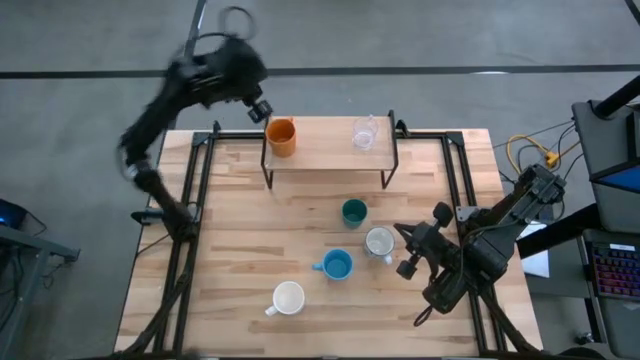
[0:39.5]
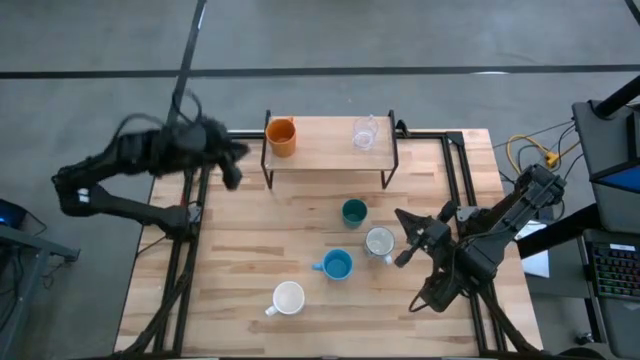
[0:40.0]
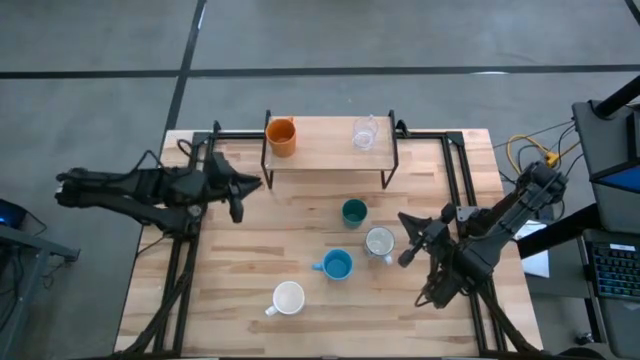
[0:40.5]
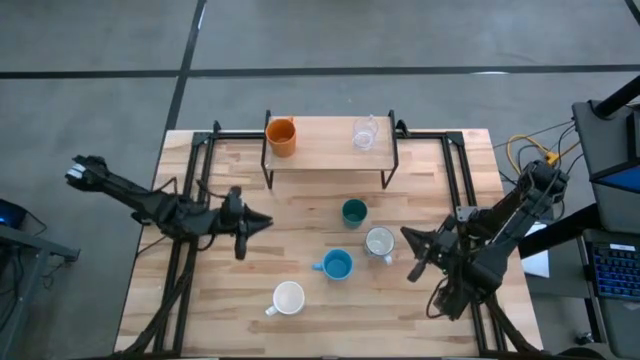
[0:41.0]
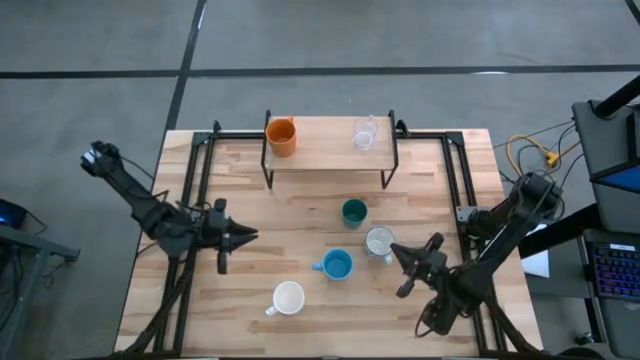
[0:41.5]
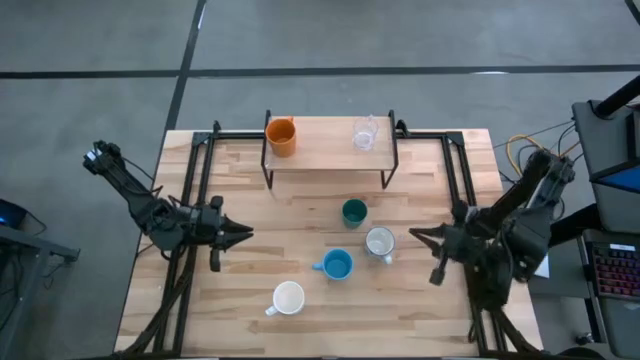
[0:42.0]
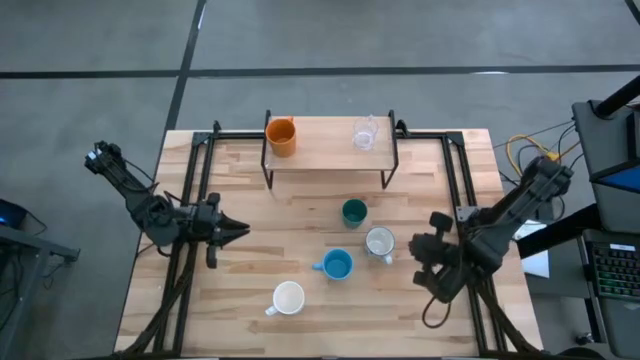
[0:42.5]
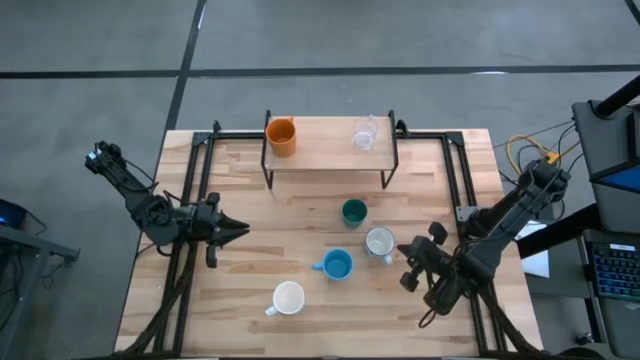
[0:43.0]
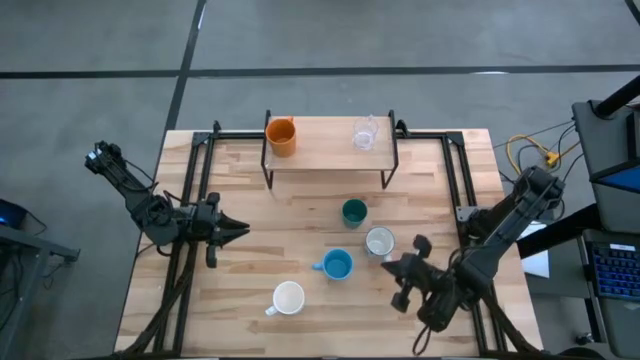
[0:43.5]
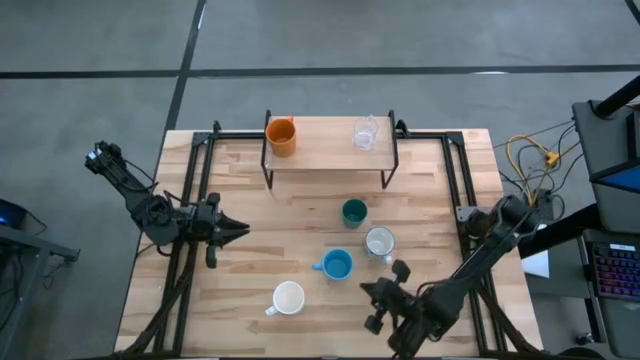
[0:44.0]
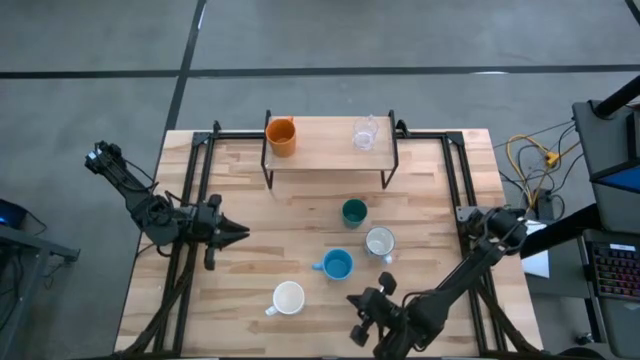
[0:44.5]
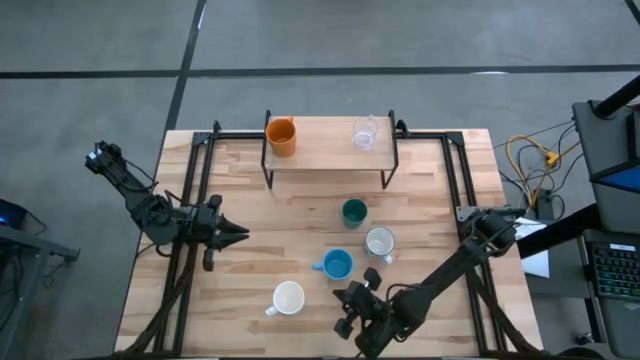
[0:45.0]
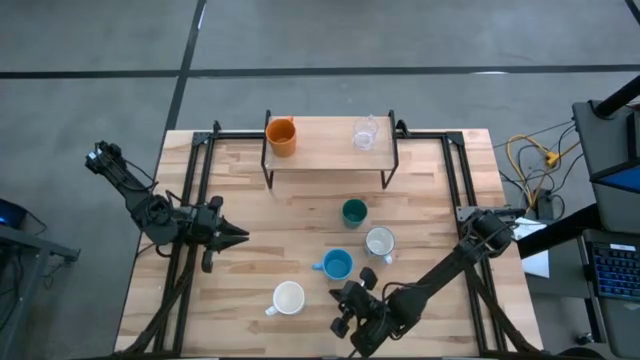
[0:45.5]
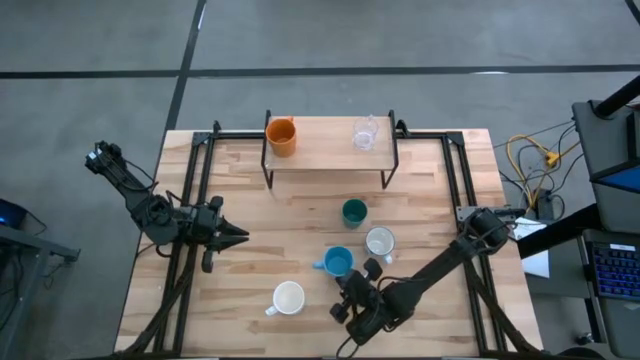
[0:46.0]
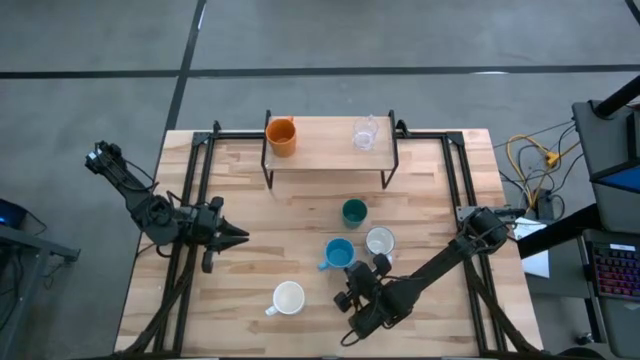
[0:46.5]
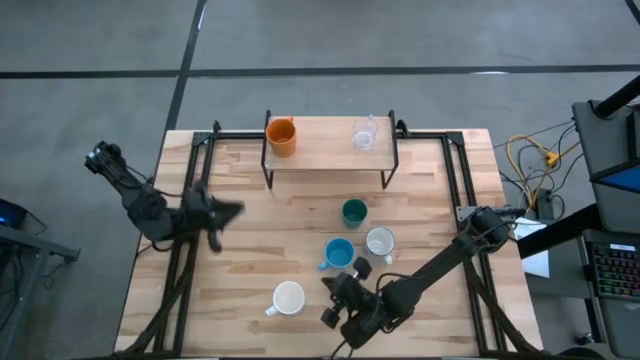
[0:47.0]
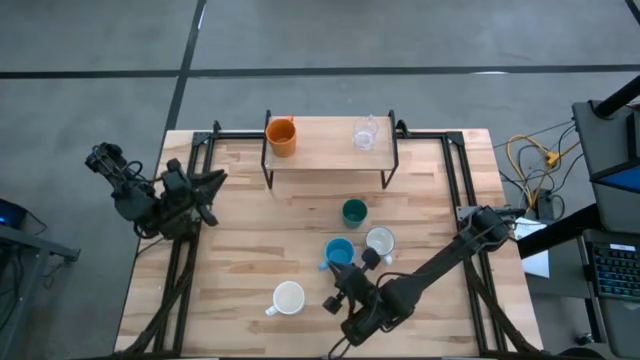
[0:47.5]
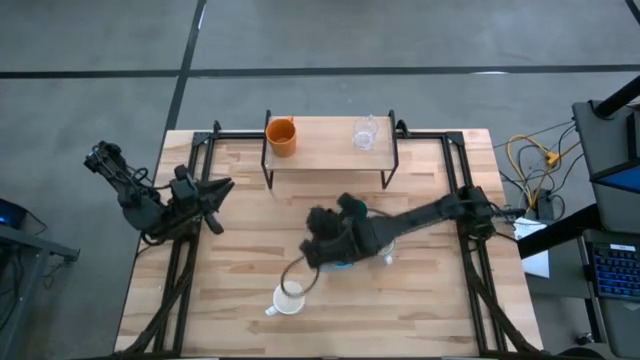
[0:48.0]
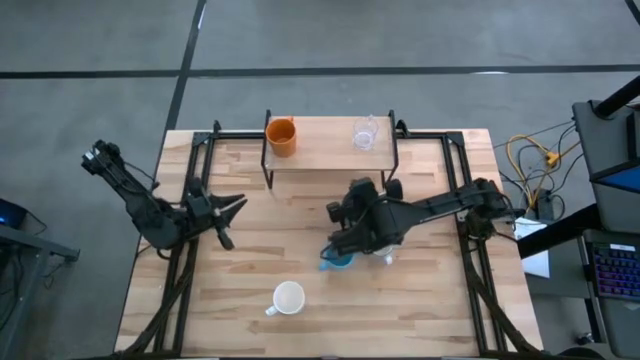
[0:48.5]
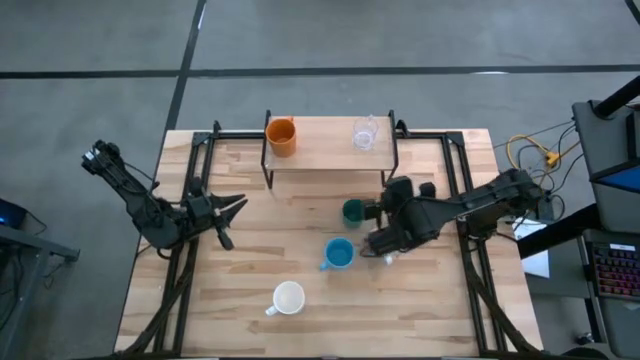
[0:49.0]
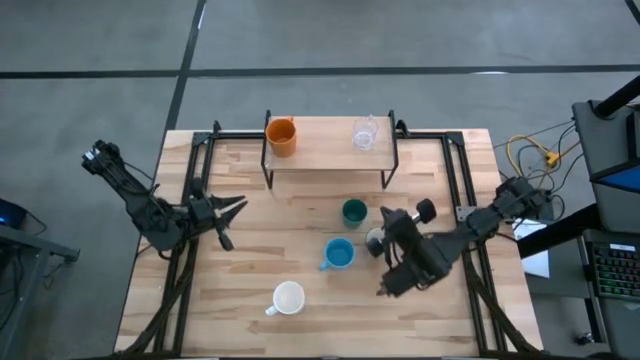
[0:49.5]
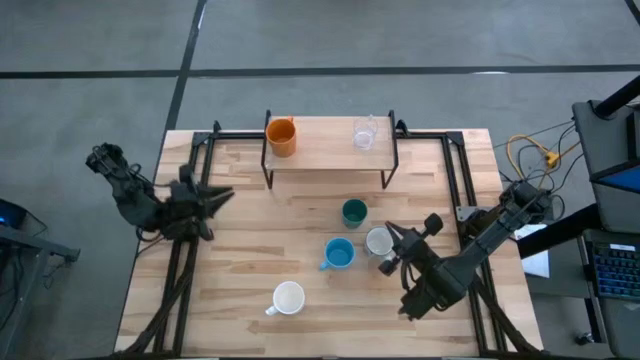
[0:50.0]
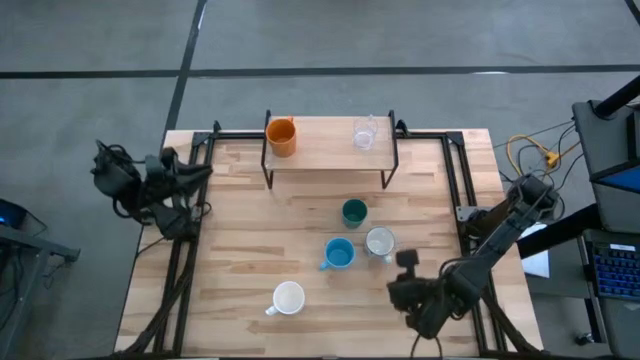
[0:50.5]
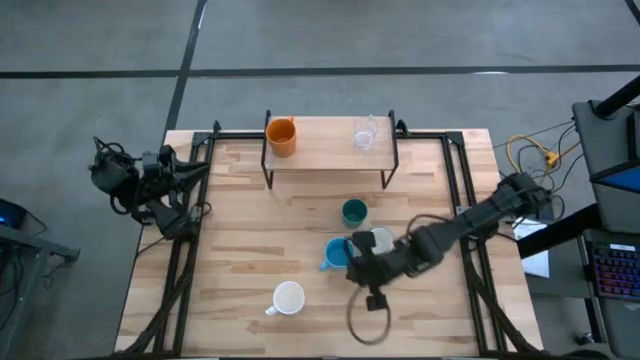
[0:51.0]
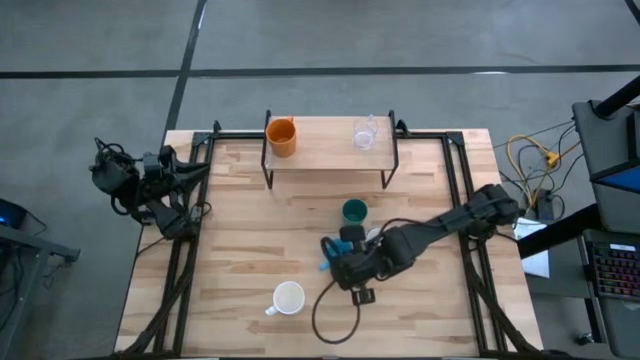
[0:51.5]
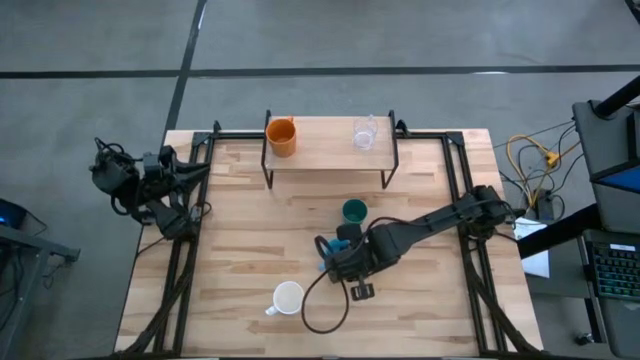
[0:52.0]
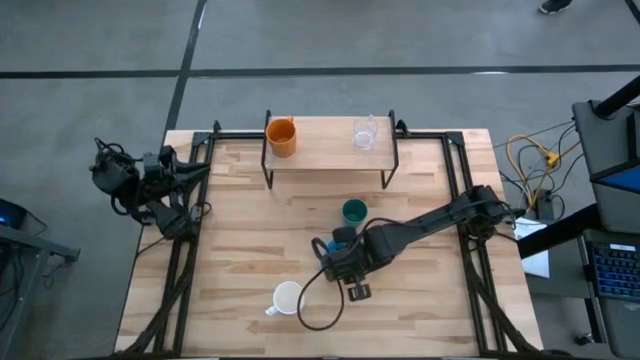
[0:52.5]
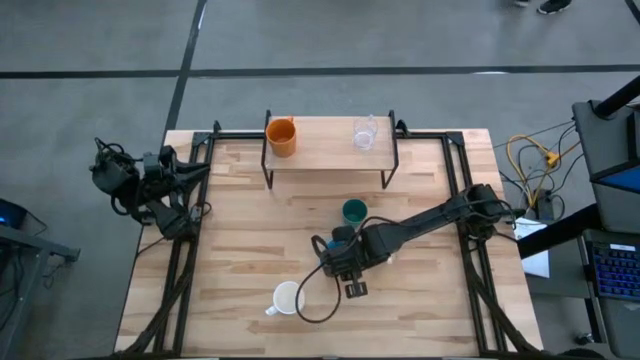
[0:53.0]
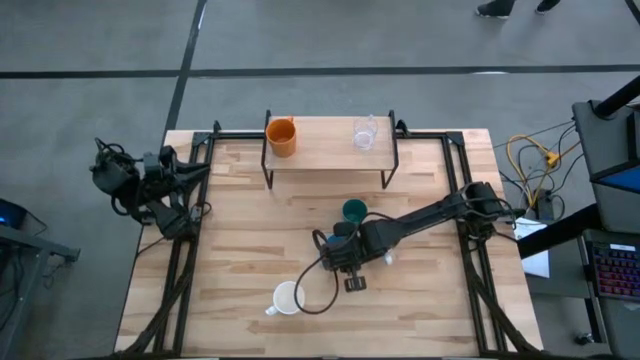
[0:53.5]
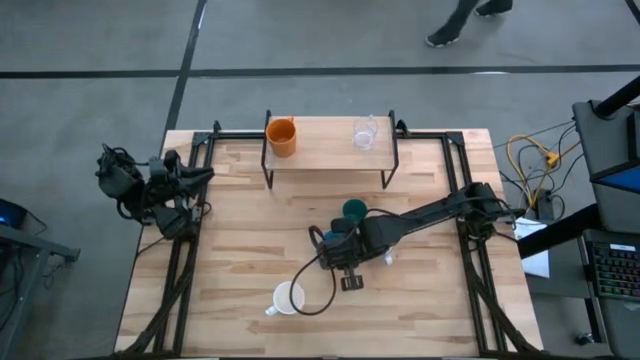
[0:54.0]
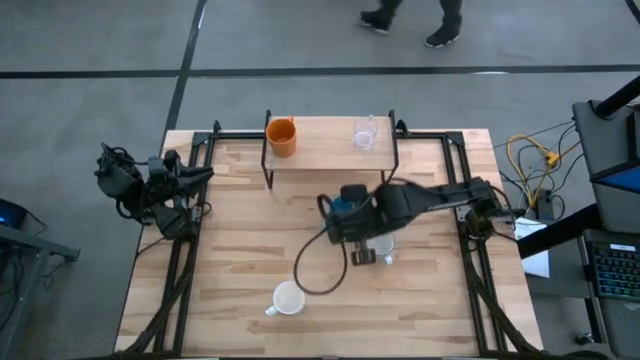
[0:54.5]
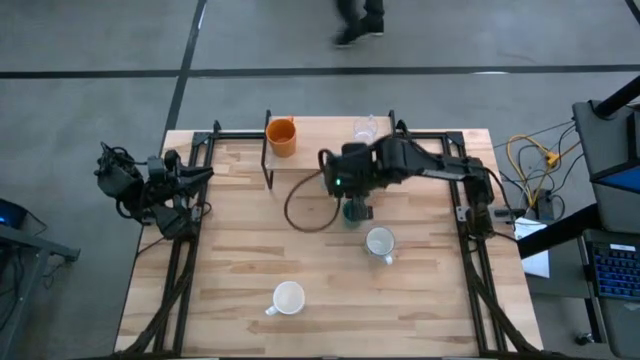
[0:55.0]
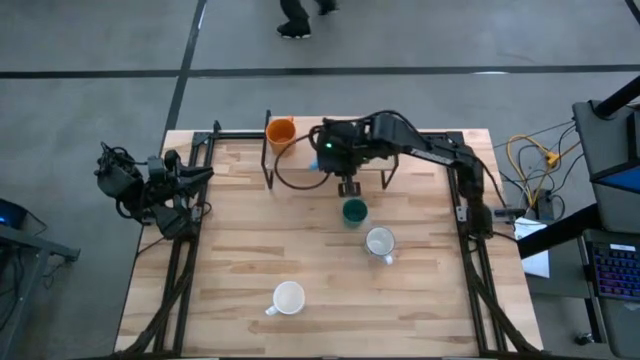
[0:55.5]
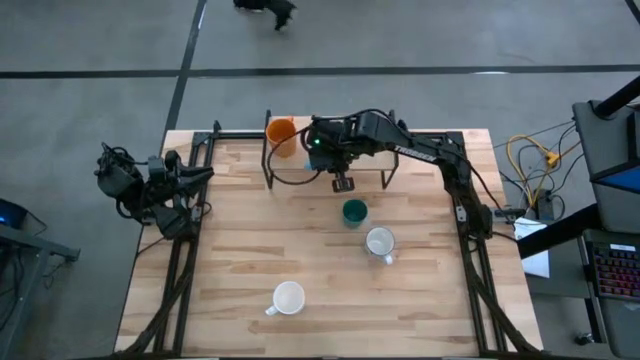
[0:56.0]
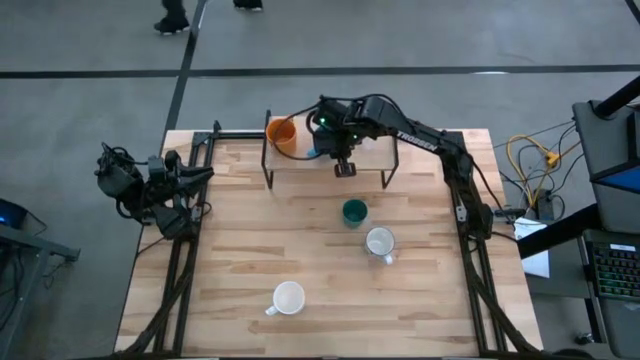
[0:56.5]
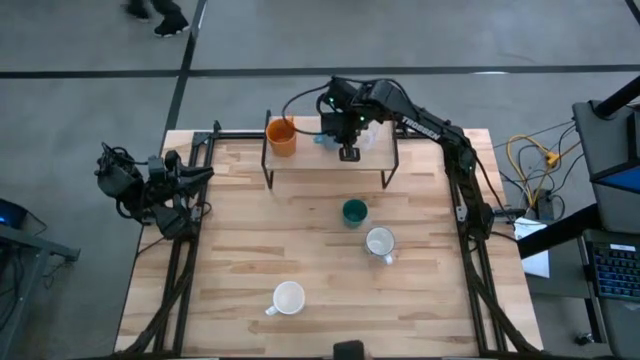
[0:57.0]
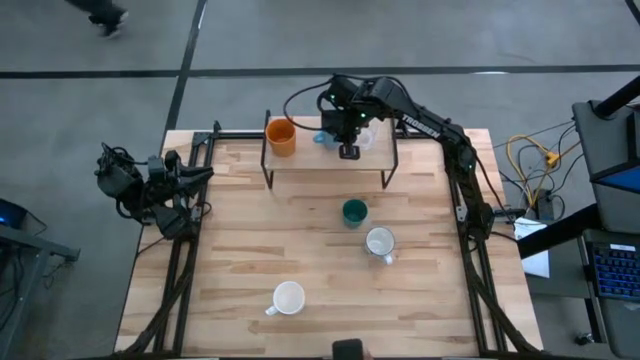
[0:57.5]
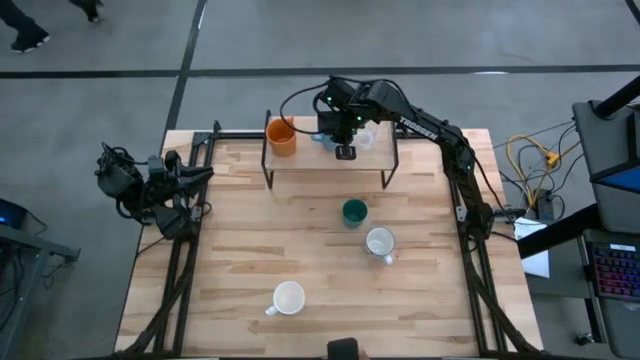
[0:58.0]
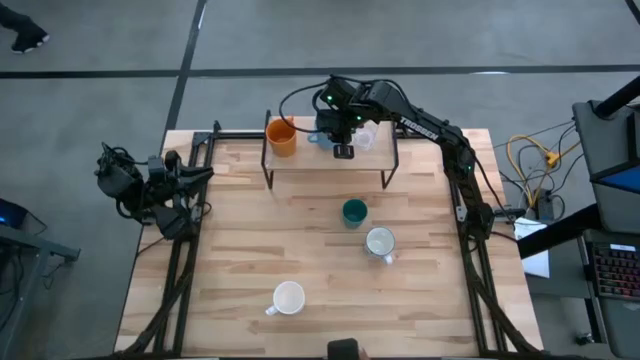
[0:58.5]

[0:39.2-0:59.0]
Task: Stack small to large cups/mugs on shelf
Put the blue mug on the shelf
